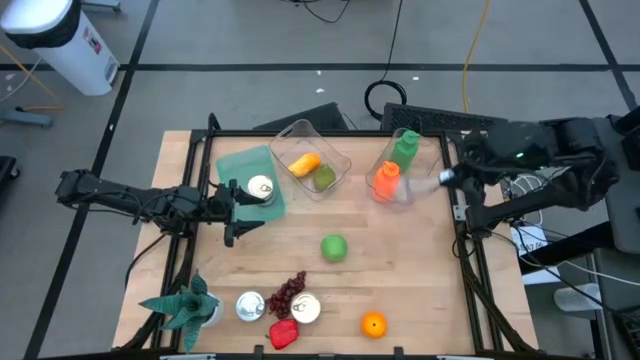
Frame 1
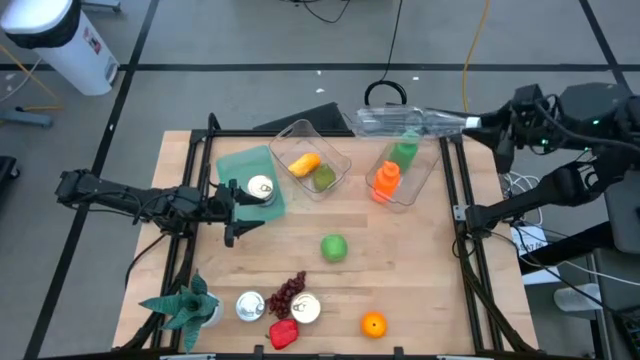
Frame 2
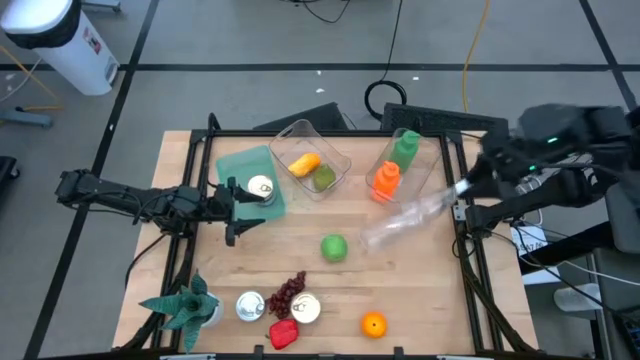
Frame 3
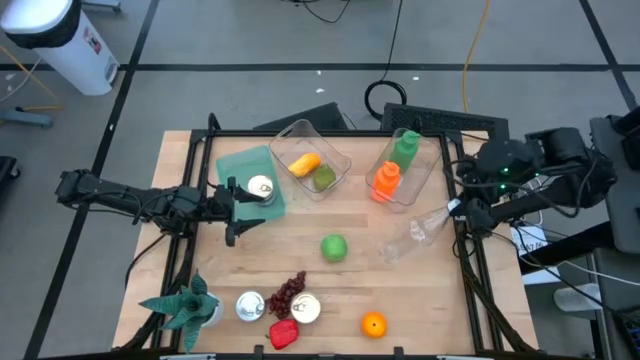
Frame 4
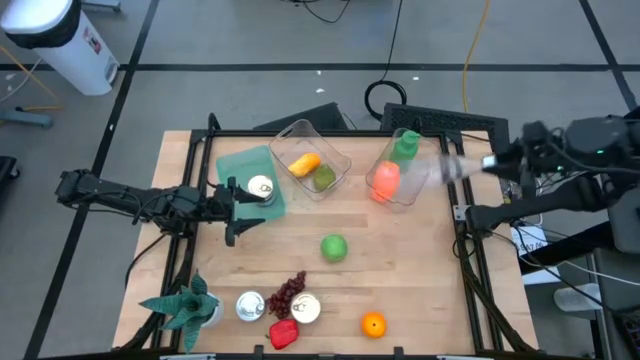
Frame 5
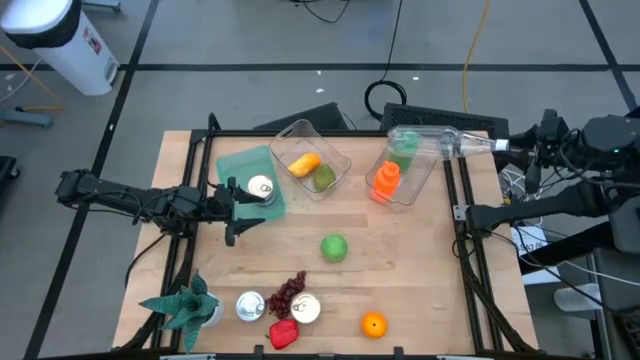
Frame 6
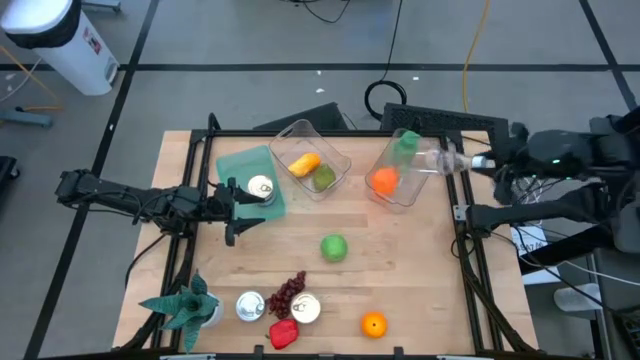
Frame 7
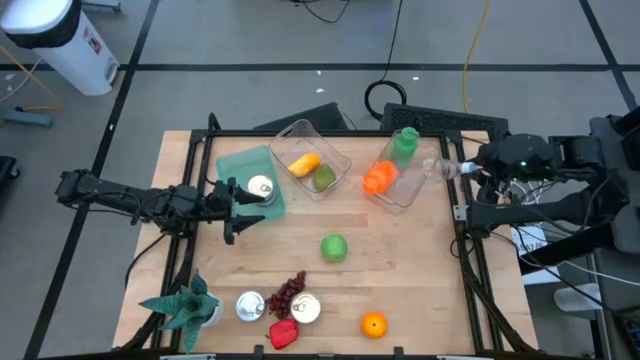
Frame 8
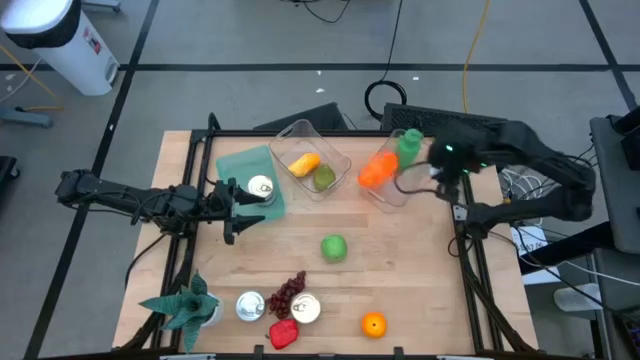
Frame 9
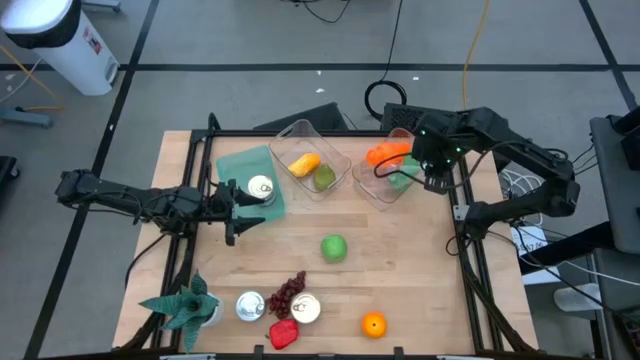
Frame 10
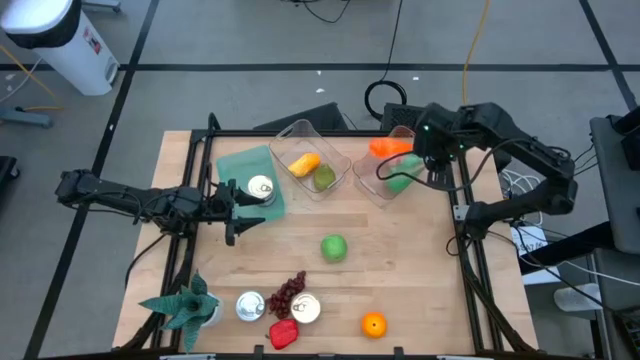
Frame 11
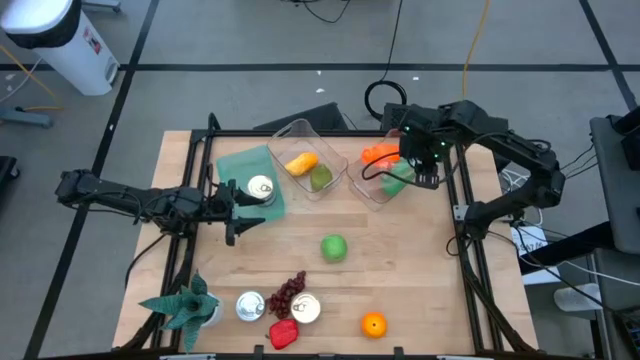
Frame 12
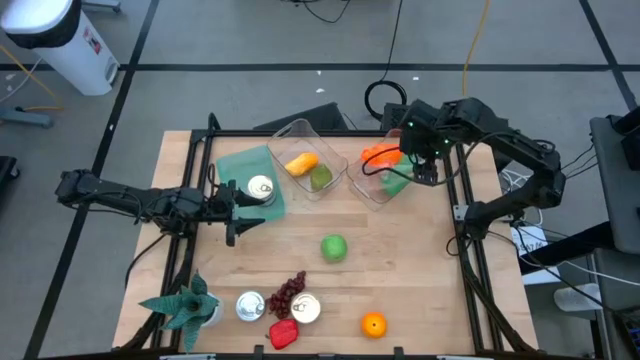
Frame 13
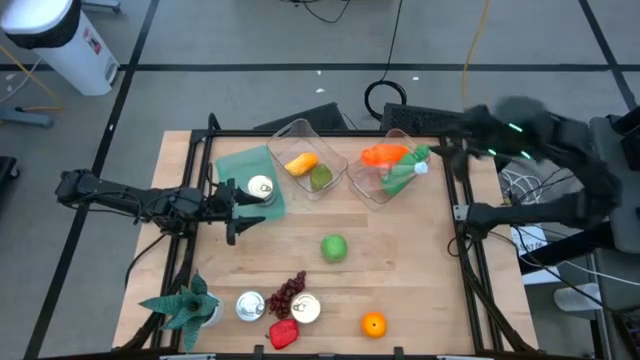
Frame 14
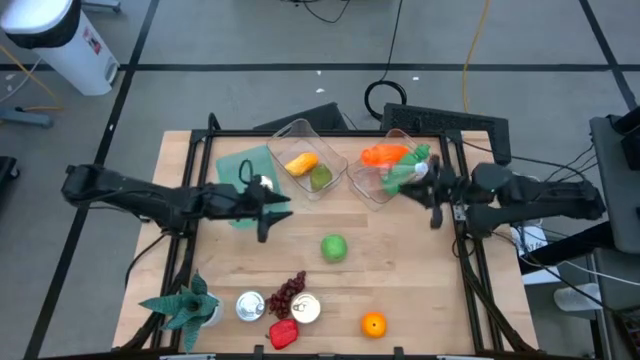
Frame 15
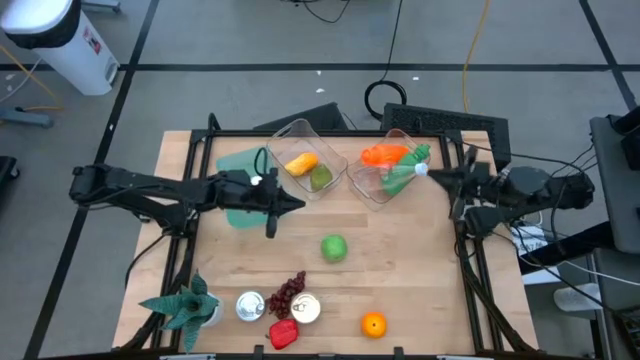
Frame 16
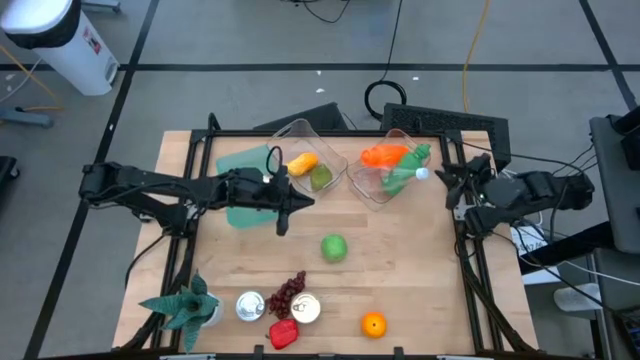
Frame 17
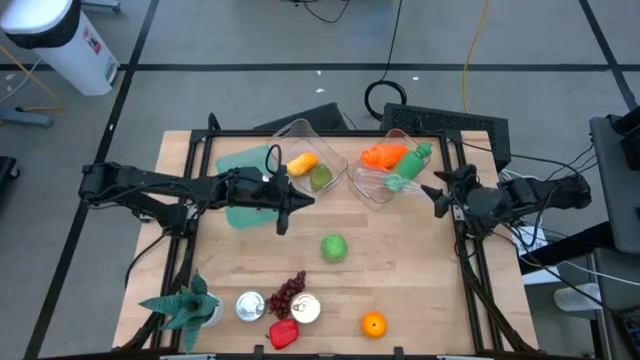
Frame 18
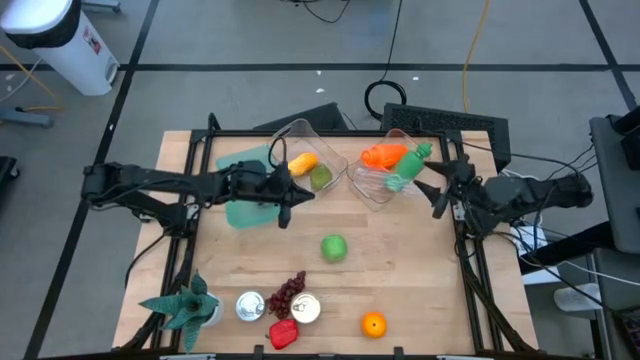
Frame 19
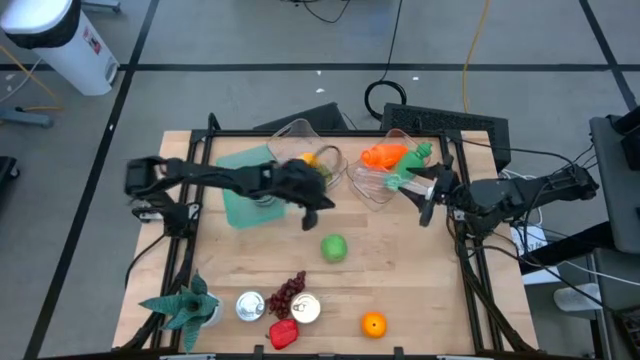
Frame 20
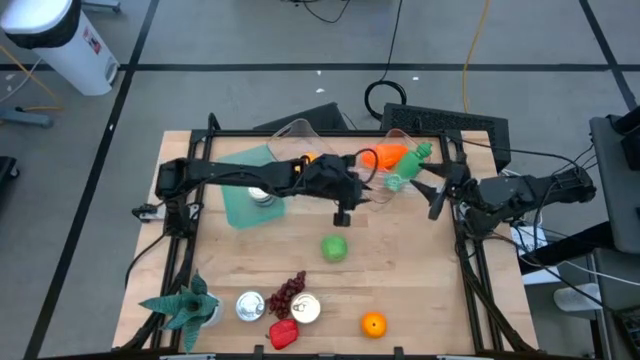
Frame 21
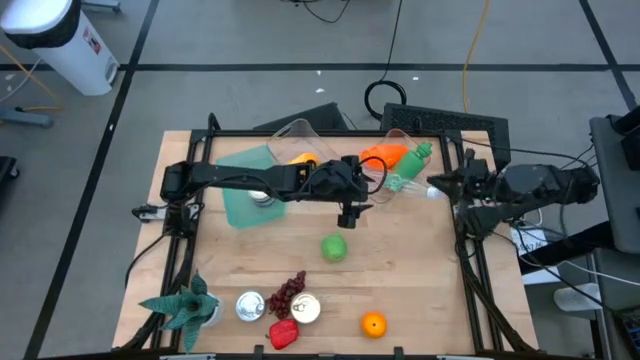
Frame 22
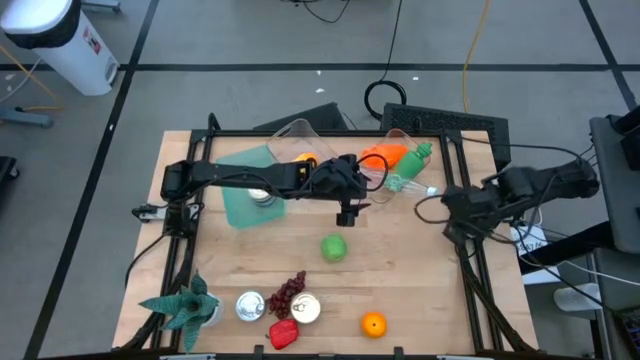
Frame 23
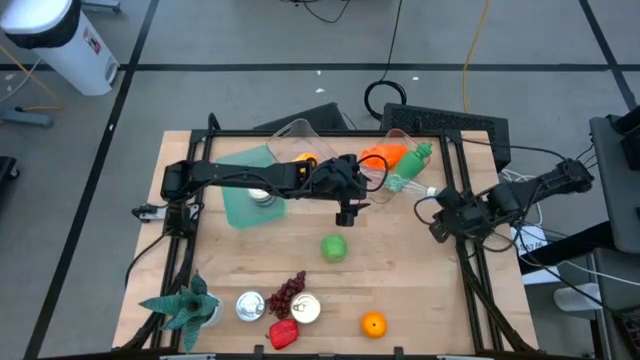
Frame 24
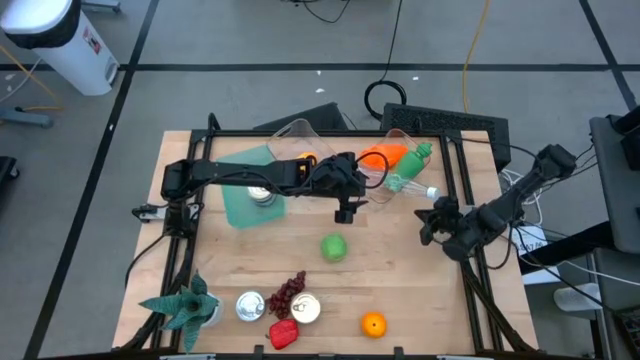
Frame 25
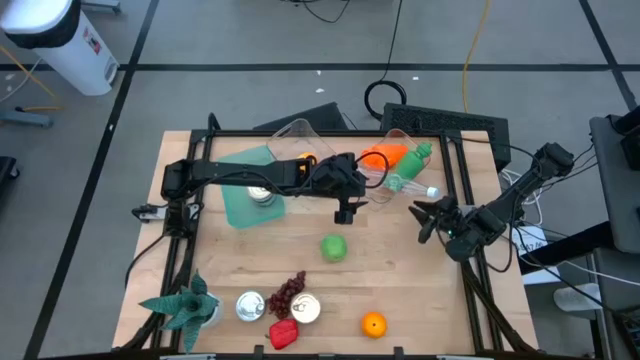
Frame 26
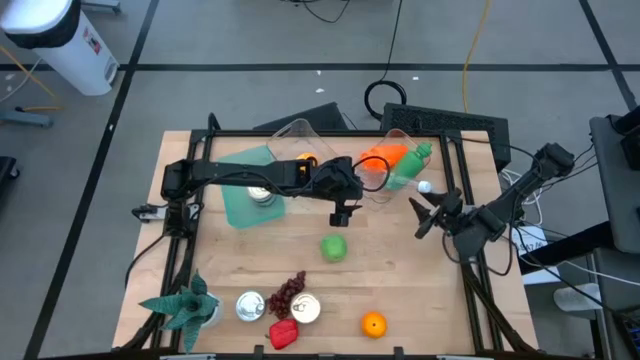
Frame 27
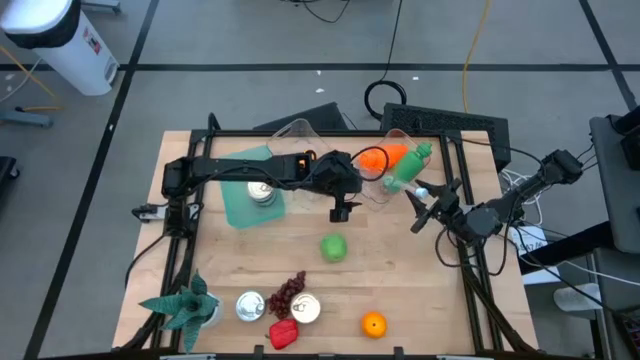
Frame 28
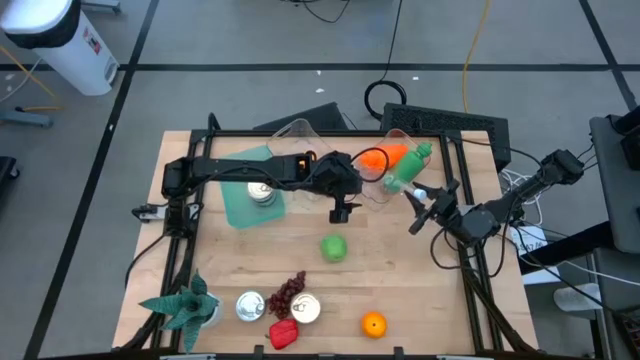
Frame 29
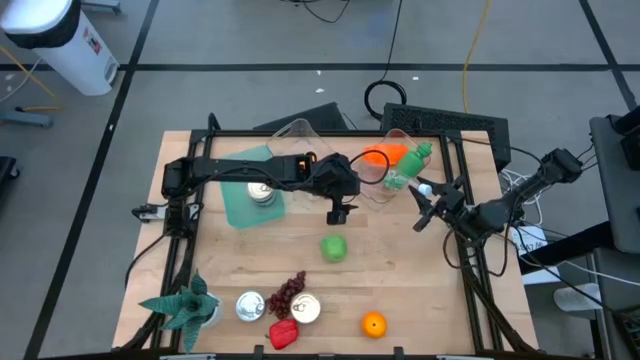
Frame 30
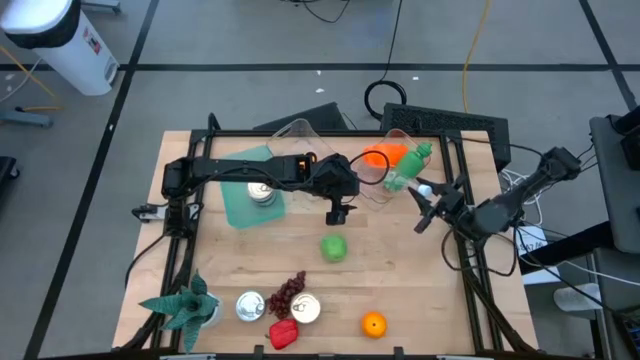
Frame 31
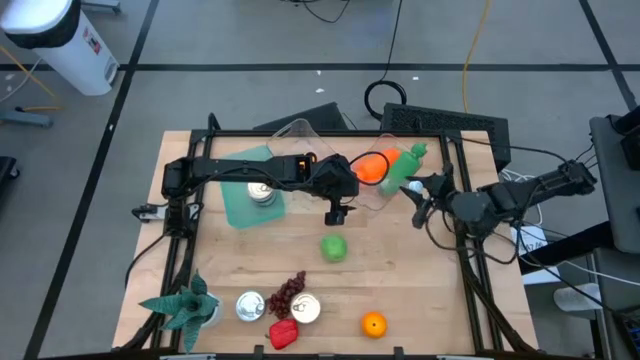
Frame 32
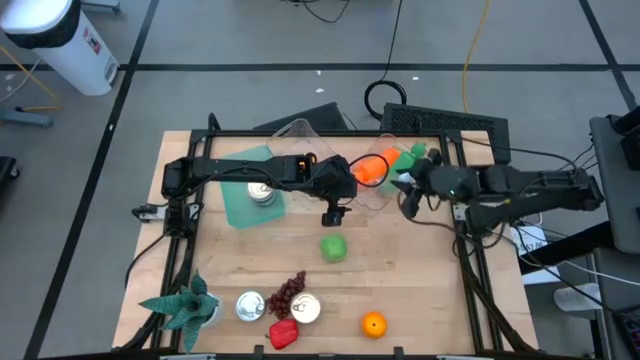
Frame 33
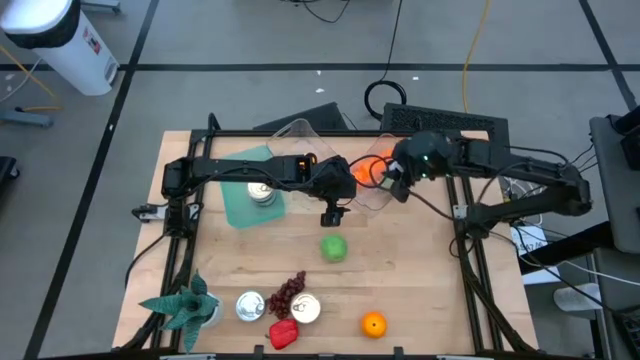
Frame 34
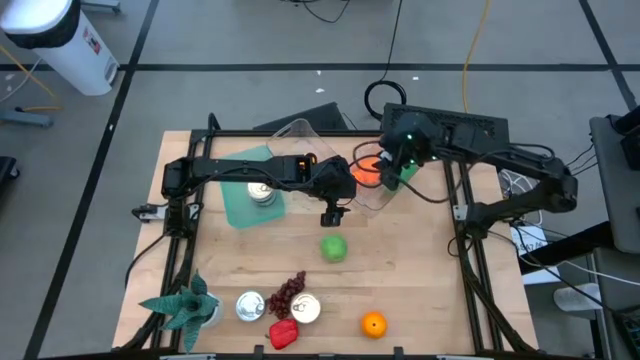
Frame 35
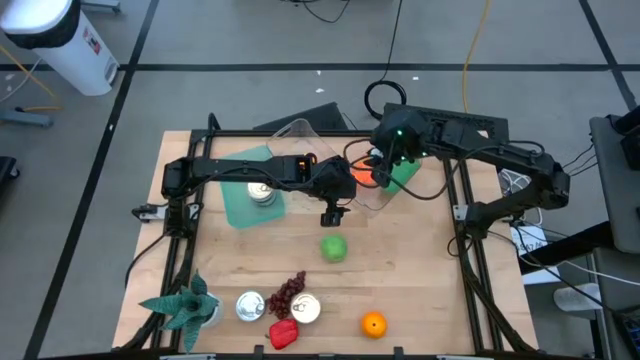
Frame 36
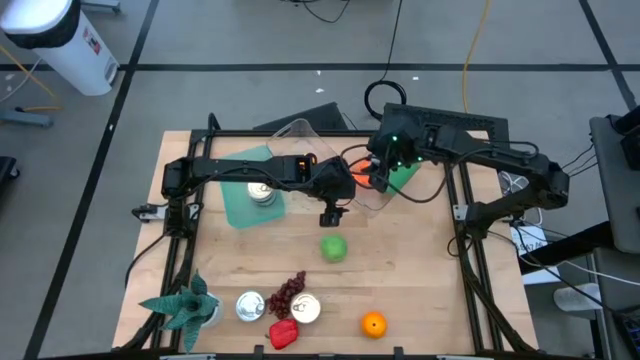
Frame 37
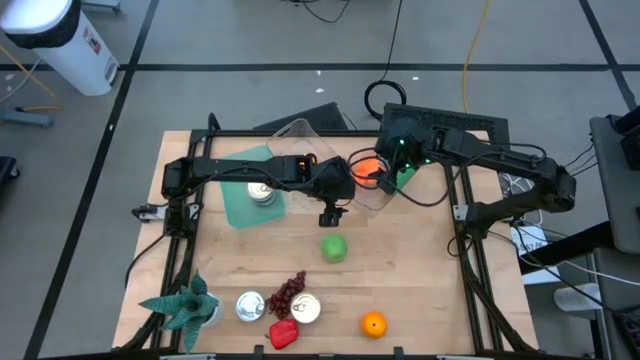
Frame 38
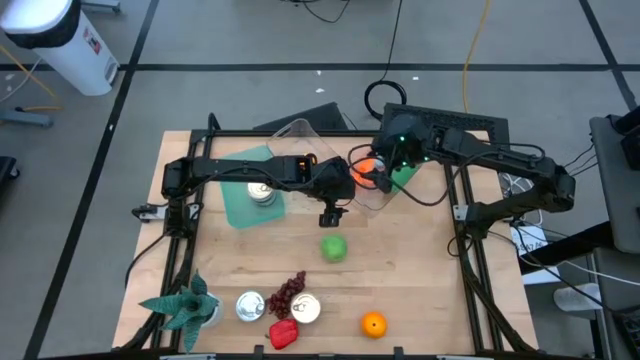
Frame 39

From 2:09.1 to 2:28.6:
Task: Pick & Place Food Item
Put the transparent bottle into the right transparent bin
